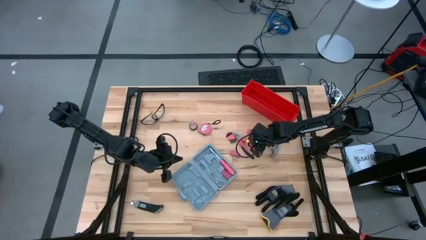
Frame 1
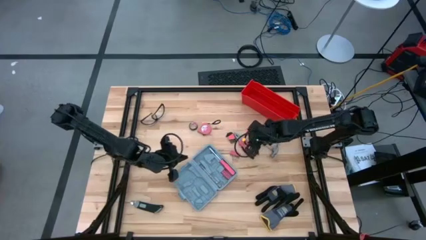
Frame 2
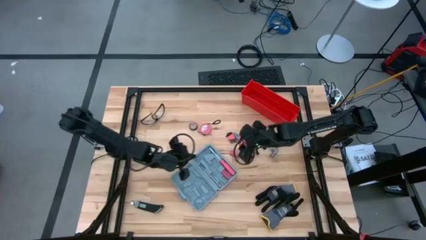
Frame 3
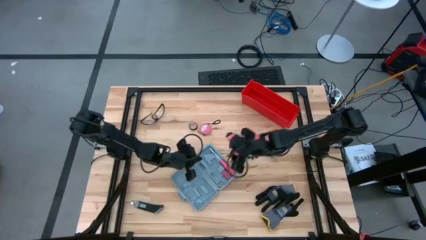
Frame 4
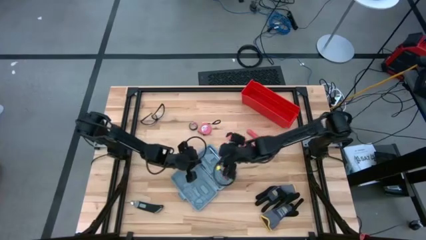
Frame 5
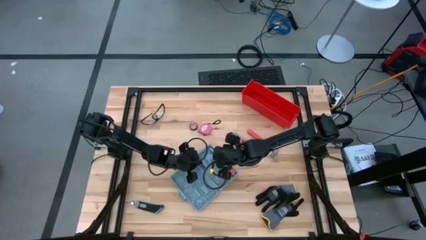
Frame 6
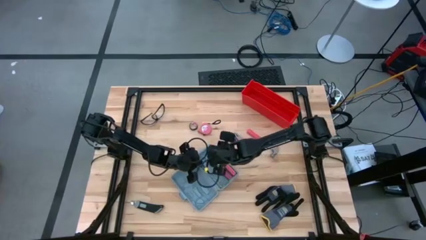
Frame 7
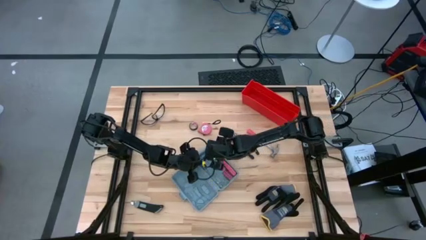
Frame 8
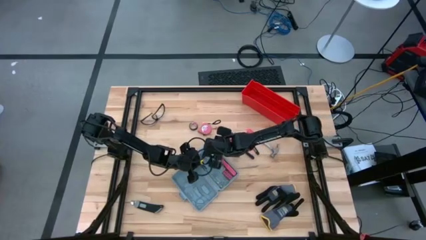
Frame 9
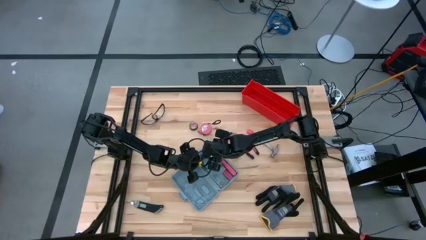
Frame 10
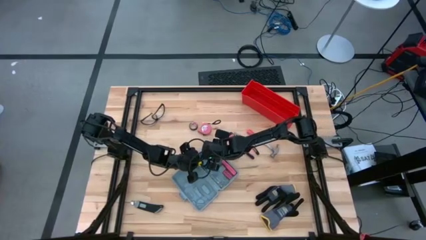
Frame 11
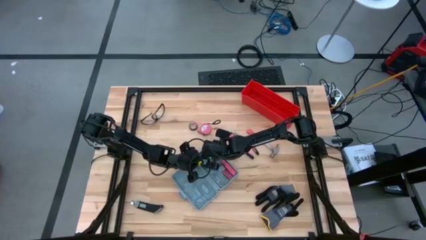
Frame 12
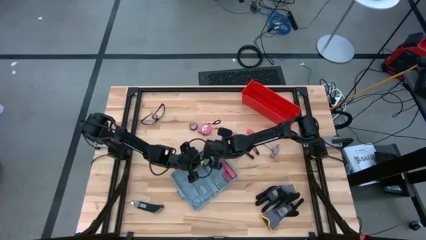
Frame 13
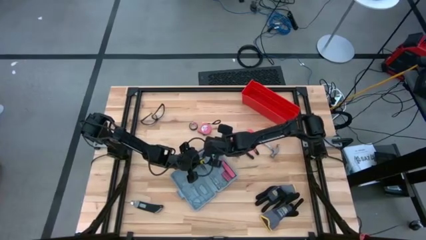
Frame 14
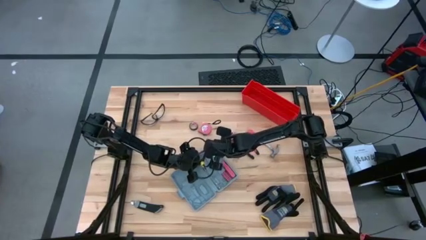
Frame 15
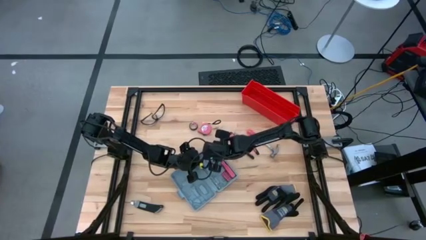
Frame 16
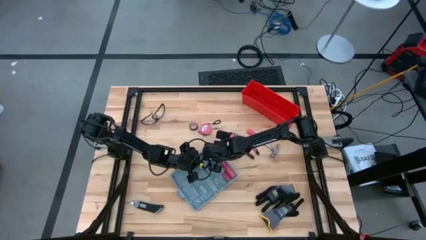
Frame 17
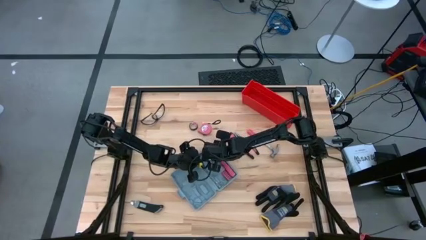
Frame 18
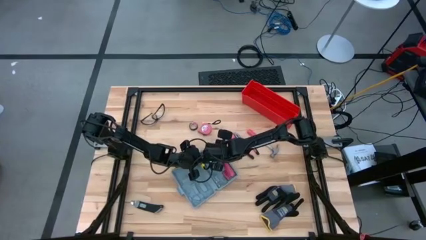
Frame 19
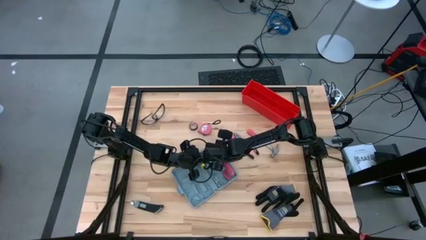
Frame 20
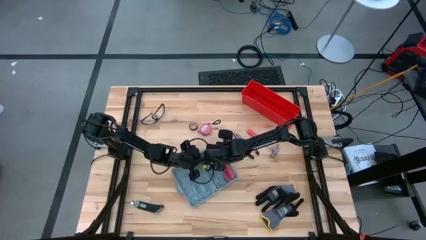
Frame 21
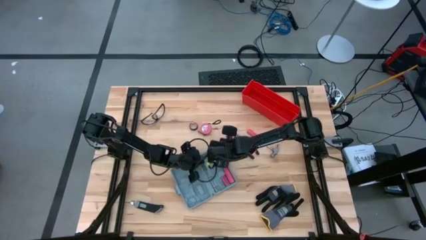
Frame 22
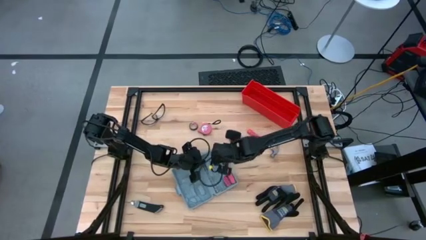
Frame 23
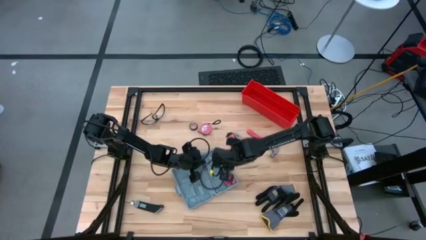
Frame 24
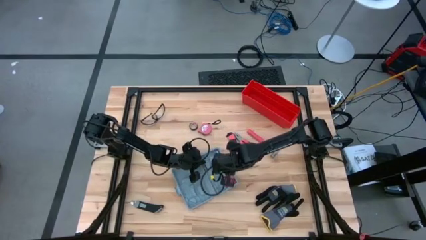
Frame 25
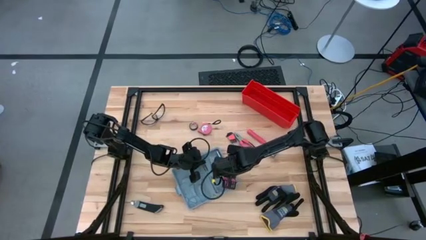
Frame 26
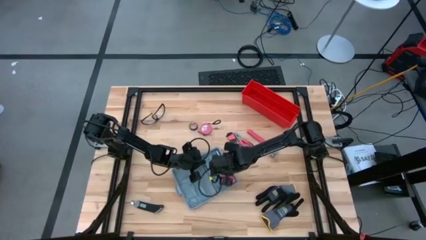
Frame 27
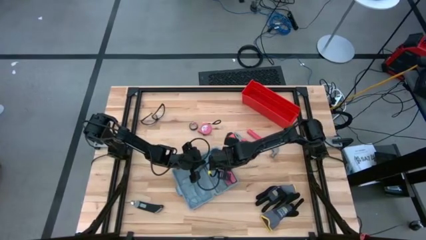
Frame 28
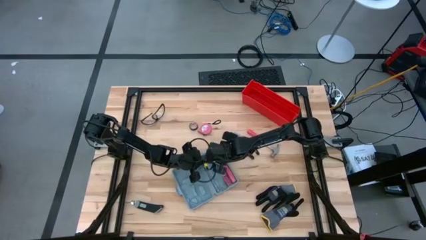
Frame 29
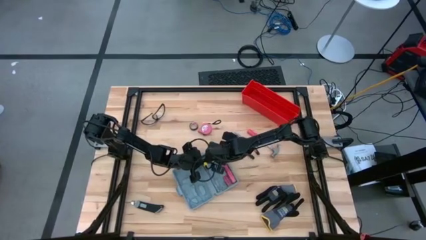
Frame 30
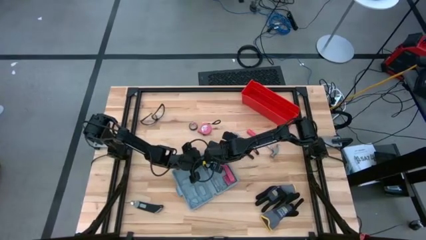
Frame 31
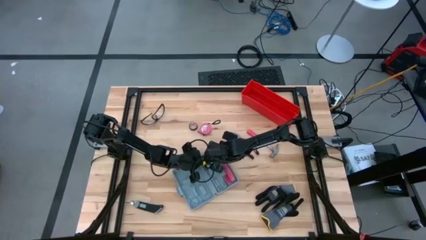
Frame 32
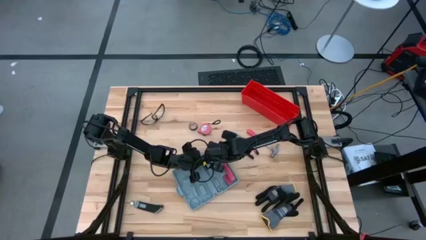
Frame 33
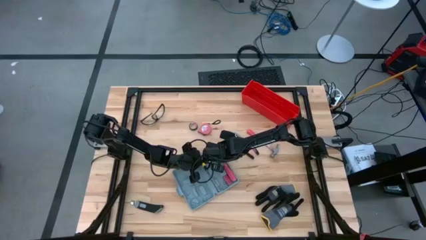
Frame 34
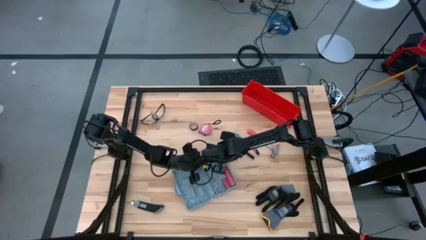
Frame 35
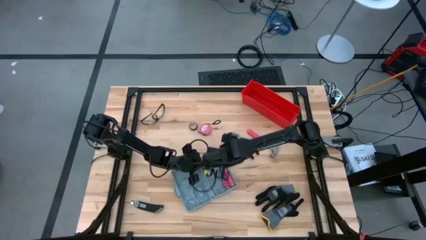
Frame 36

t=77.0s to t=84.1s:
Task: prefit tool cases
Remove the screwdriver from the toolbox

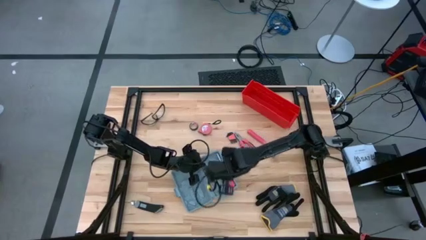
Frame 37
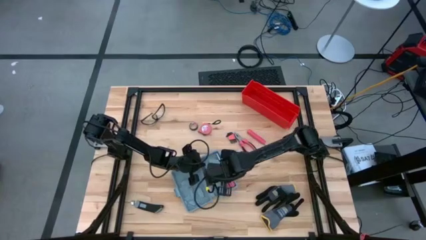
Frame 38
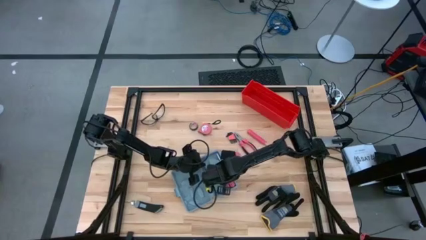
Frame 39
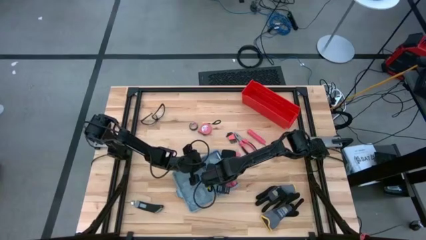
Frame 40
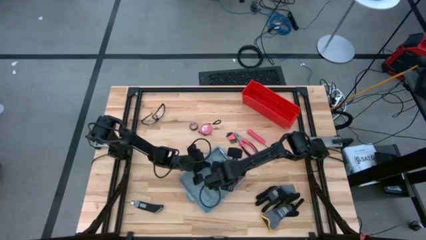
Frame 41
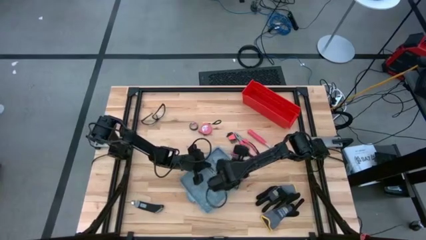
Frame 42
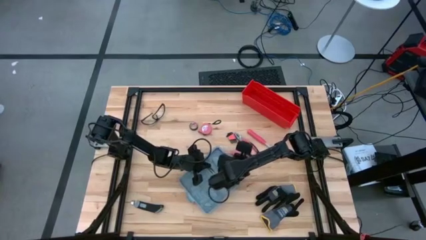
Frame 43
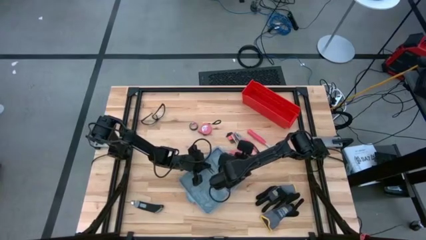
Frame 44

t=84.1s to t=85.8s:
Remove the screwdriver from the toolbox

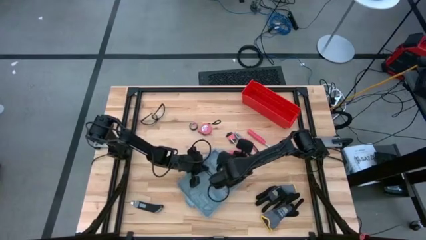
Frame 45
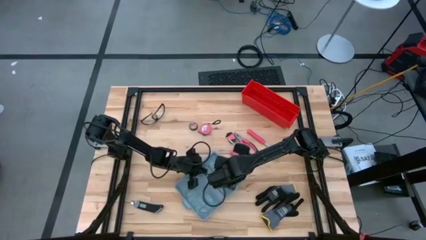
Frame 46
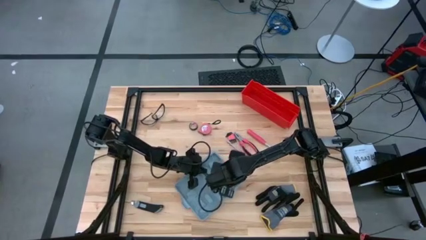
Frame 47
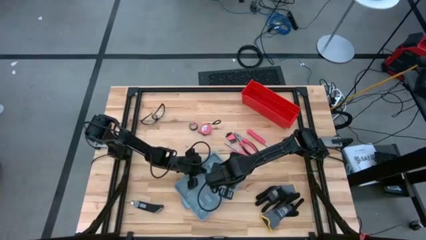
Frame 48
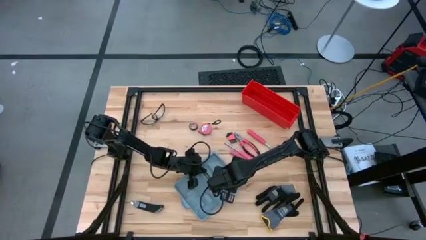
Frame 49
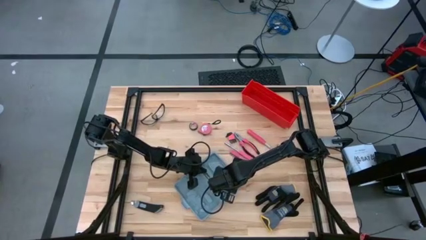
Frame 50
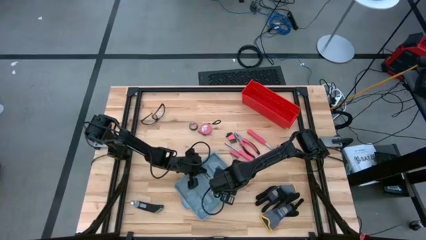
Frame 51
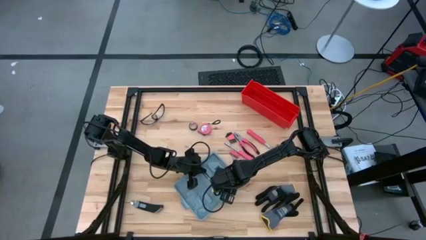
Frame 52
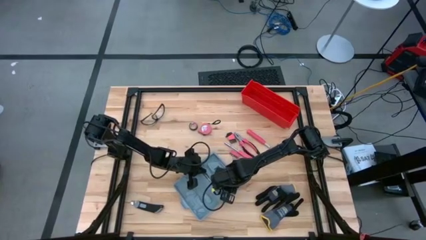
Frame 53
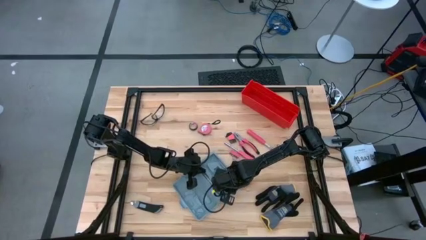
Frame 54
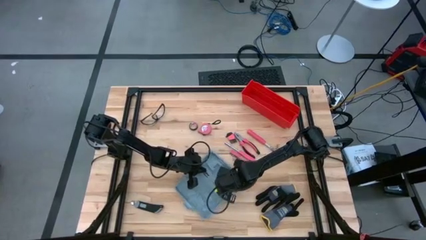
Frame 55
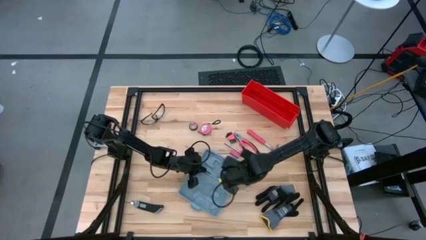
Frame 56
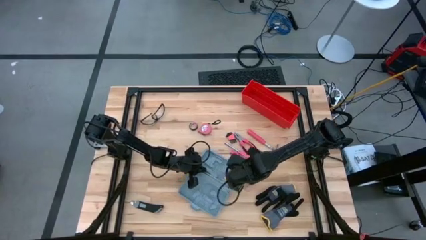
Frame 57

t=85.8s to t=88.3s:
Remove the screwdriver bits from the toolbox

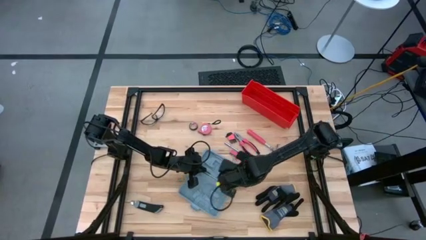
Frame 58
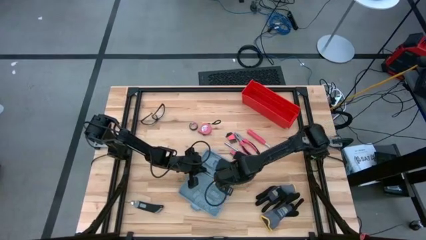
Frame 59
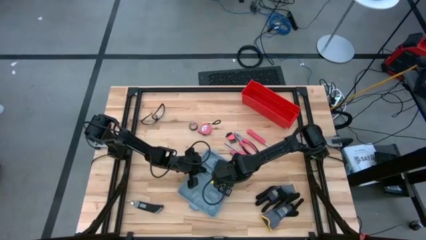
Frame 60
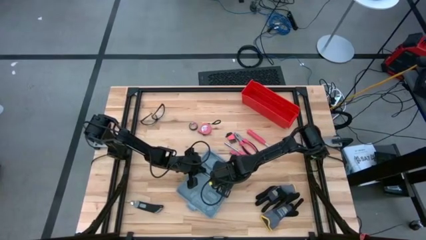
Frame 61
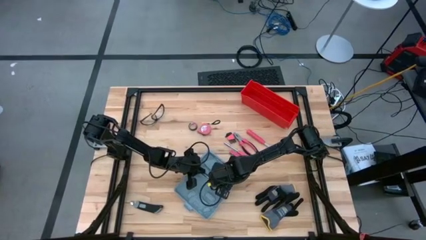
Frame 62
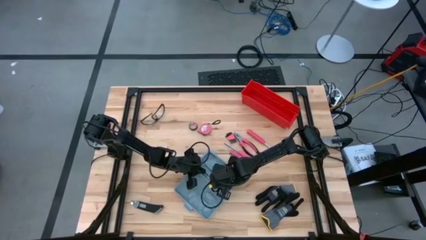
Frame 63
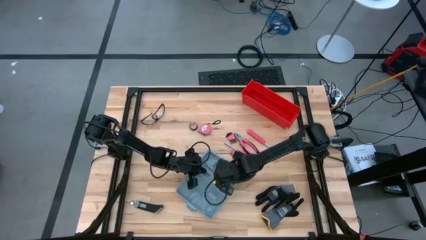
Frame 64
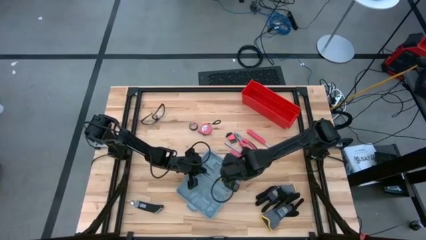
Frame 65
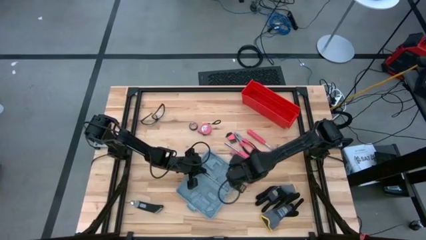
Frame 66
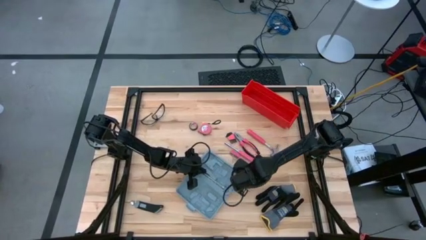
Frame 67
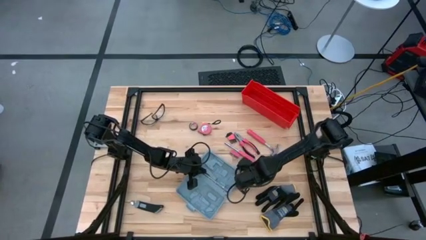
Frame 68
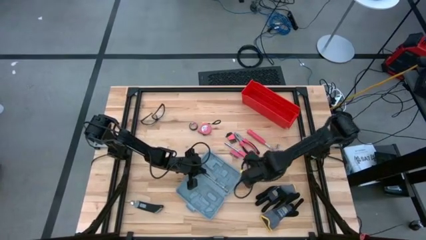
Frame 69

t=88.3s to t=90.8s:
Remove the screwdriver bits from the toolbox

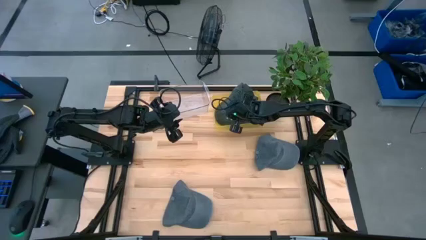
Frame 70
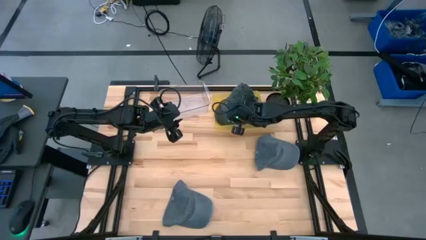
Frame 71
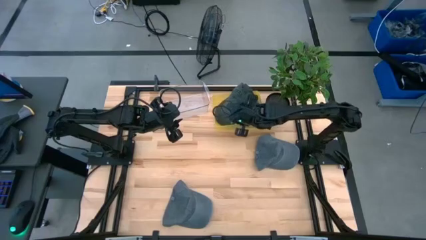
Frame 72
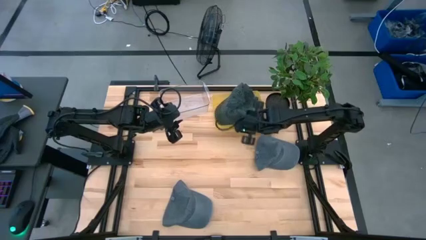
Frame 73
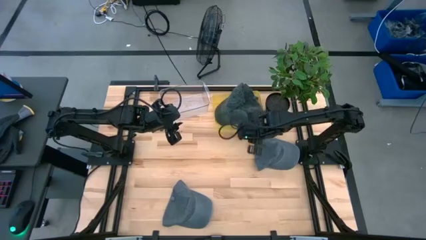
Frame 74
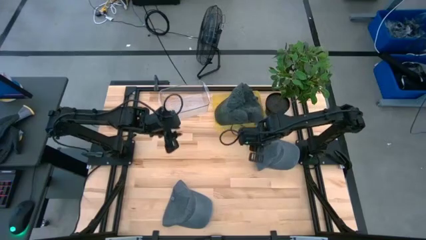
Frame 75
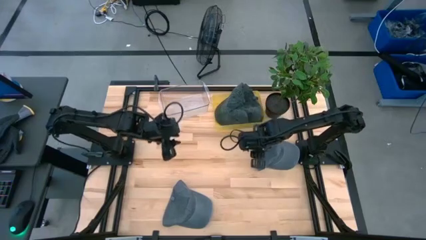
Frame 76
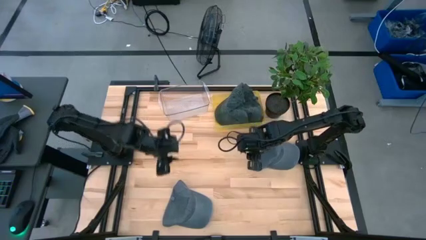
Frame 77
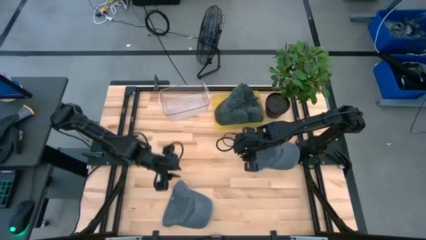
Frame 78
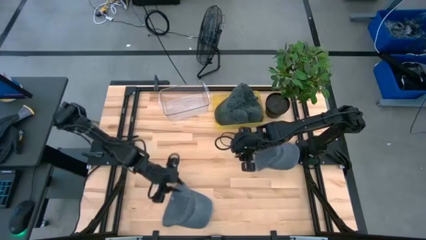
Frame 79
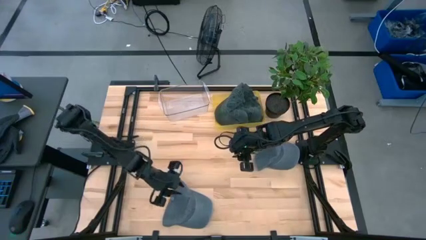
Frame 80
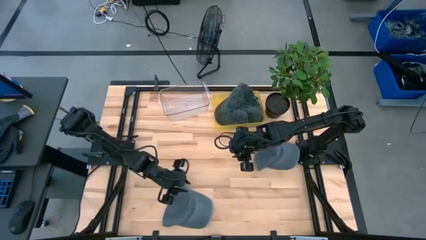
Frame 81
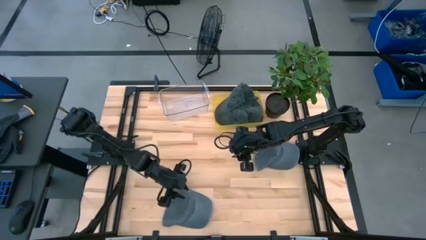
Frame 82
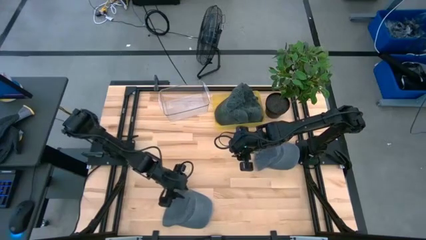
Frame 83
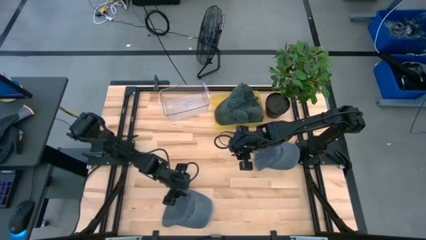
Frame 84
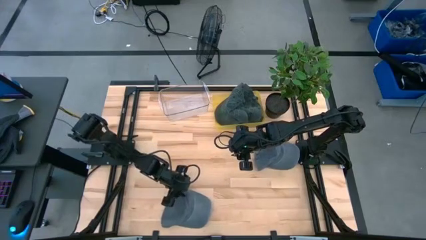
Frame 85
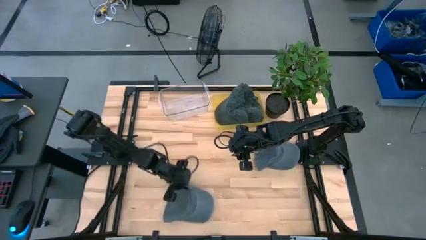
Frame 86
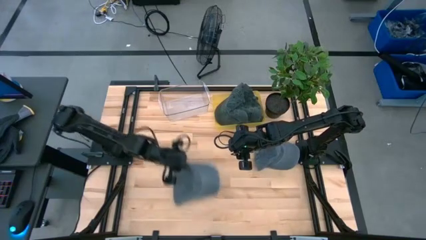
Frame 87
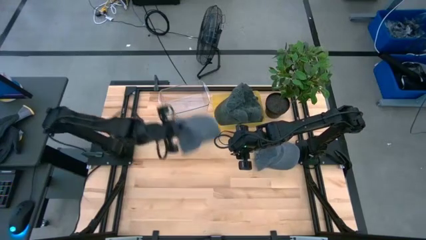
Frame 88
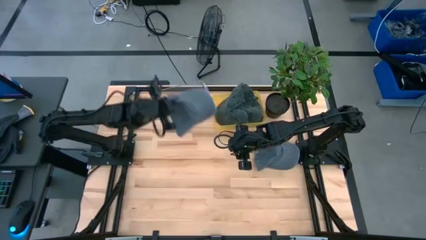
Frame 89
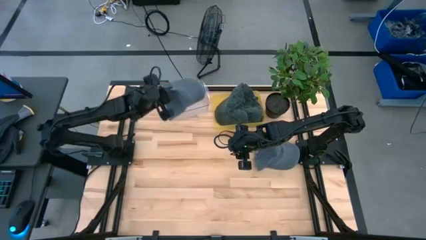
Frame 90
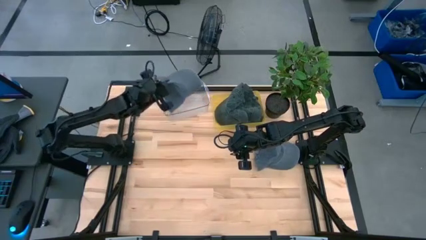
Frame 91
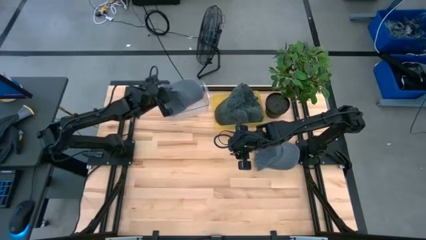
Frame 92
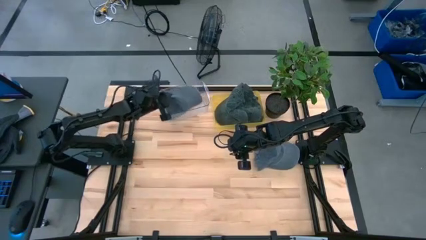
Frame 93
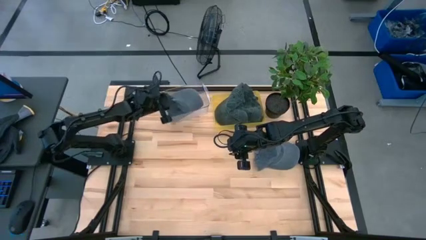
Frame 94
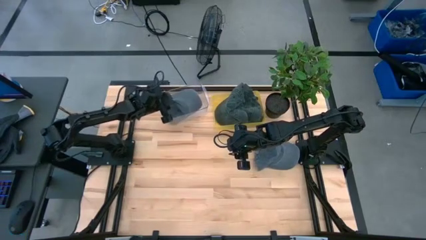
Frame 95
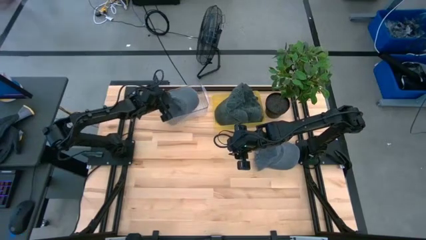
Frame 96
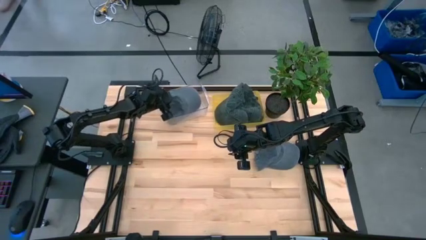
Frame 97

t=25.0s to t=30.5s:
Task: Pick & Place hat
Put the bottom gray cap into the transparent bin
